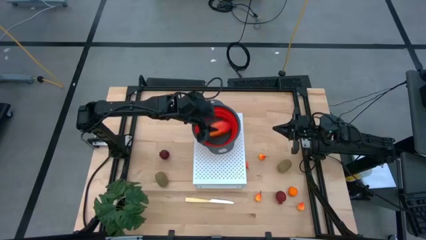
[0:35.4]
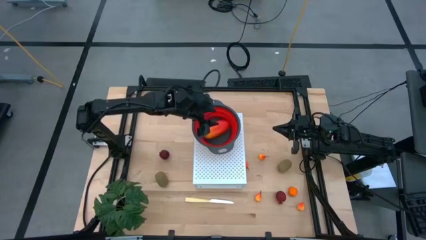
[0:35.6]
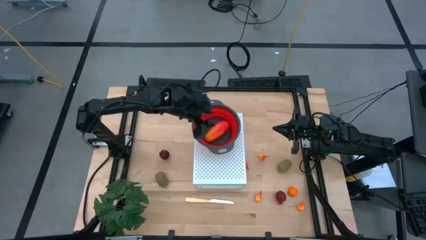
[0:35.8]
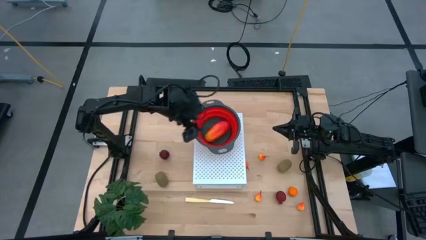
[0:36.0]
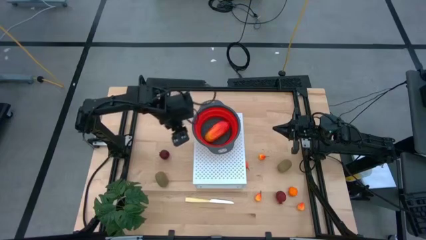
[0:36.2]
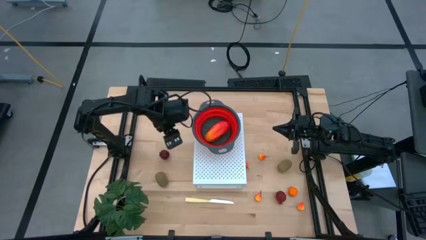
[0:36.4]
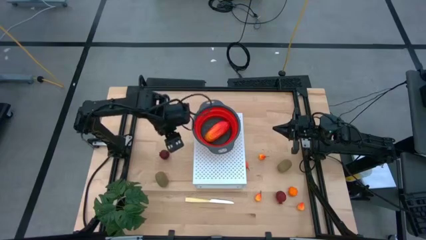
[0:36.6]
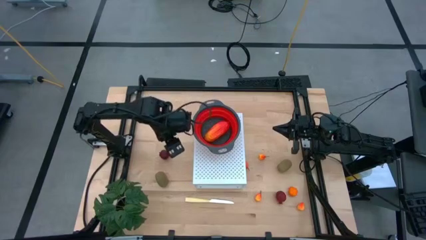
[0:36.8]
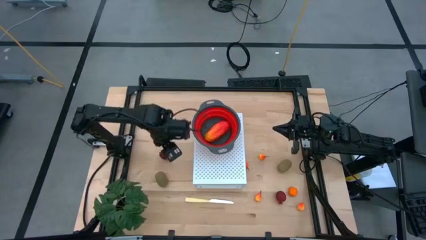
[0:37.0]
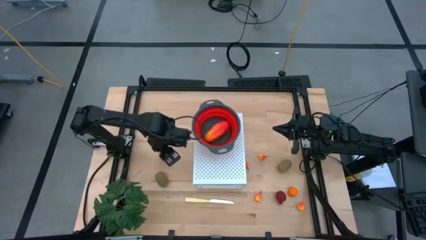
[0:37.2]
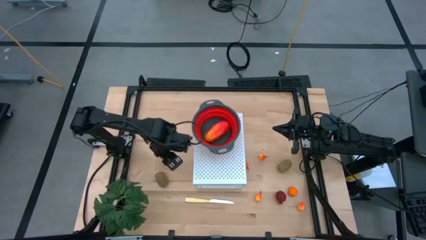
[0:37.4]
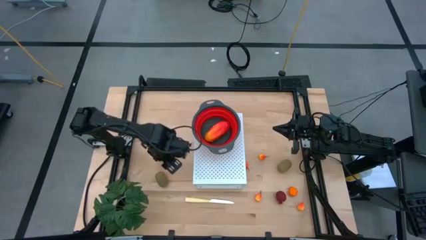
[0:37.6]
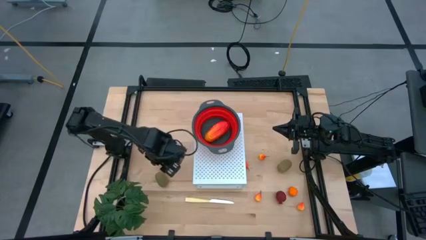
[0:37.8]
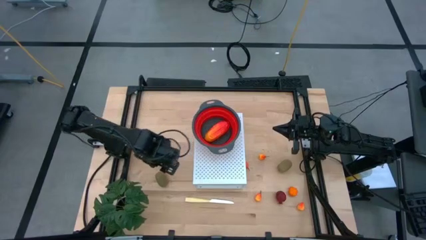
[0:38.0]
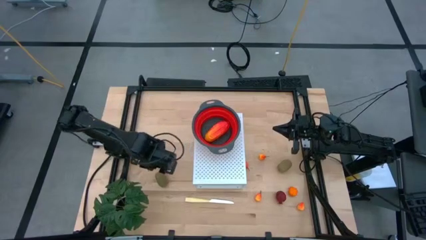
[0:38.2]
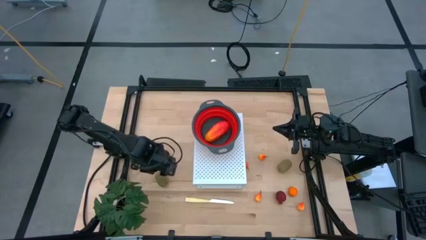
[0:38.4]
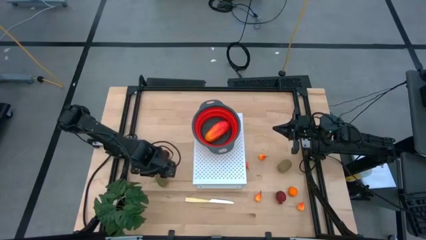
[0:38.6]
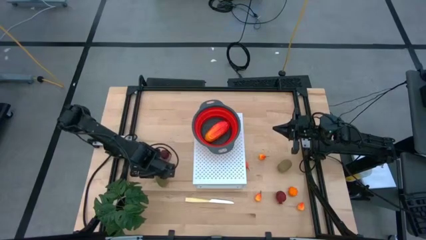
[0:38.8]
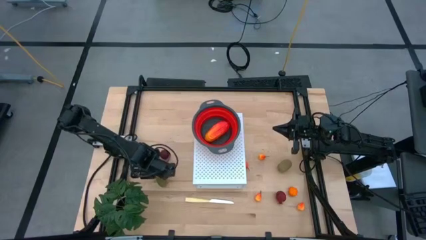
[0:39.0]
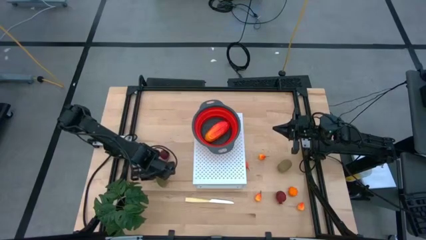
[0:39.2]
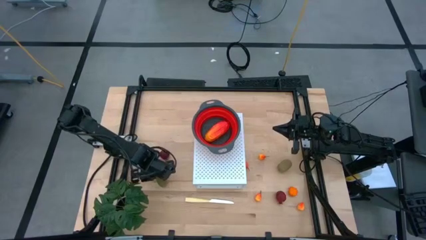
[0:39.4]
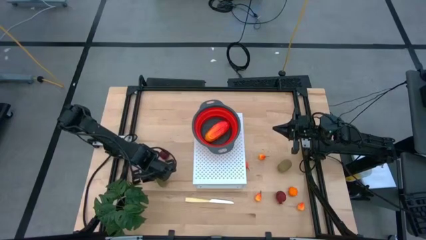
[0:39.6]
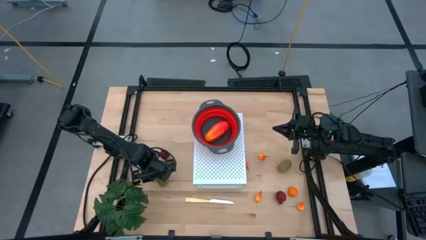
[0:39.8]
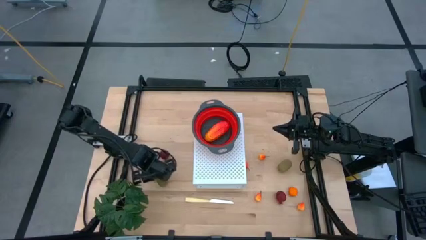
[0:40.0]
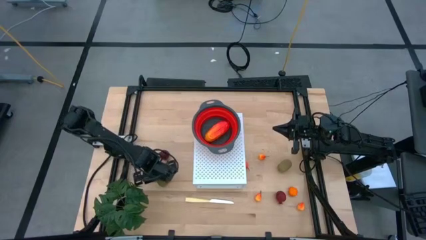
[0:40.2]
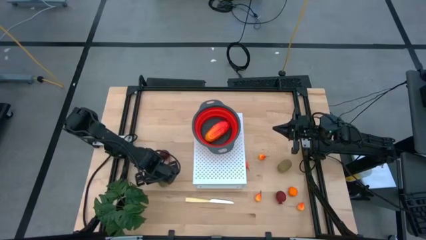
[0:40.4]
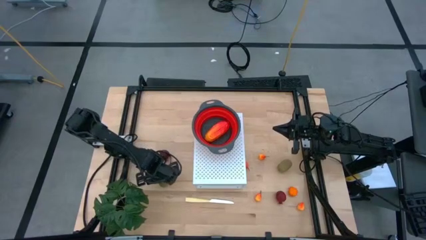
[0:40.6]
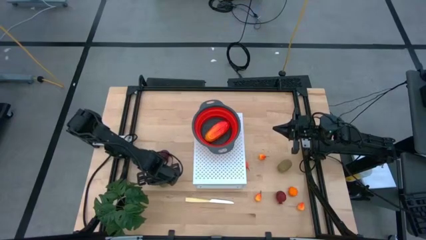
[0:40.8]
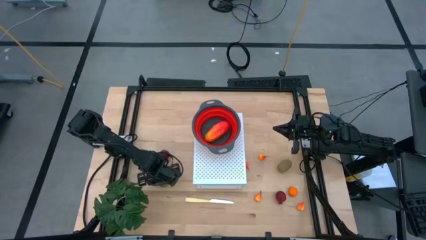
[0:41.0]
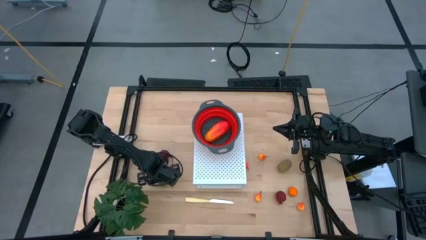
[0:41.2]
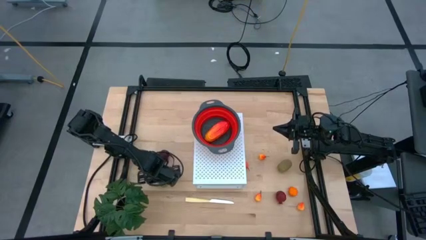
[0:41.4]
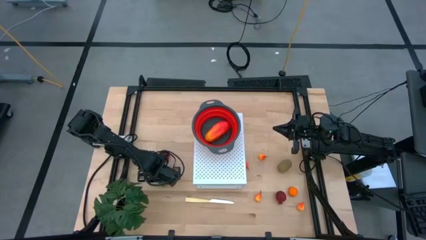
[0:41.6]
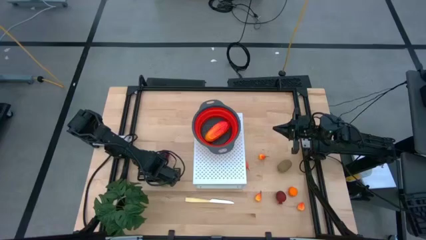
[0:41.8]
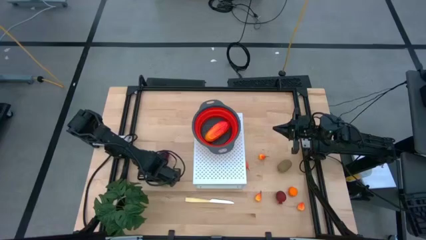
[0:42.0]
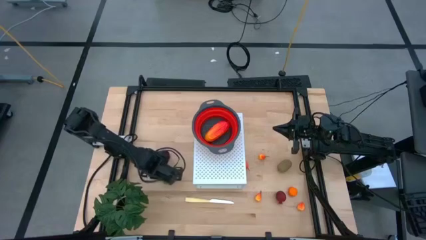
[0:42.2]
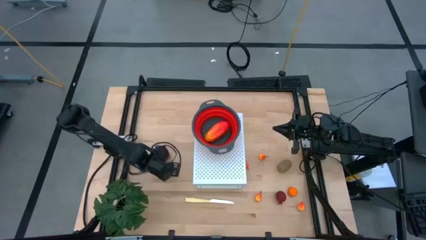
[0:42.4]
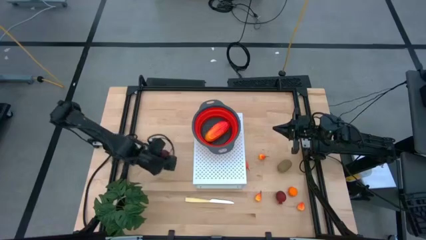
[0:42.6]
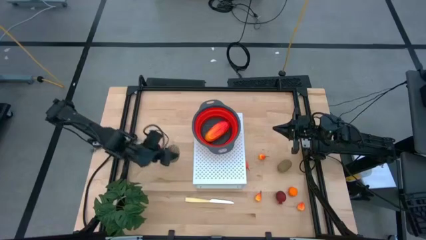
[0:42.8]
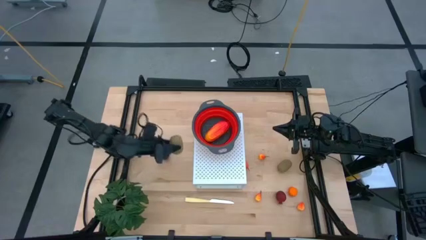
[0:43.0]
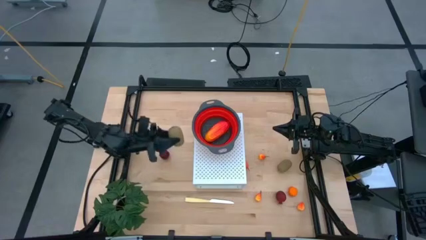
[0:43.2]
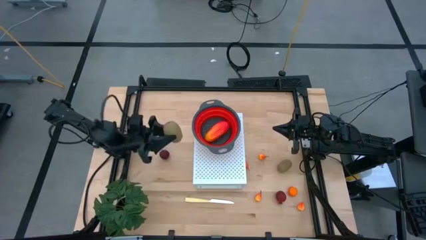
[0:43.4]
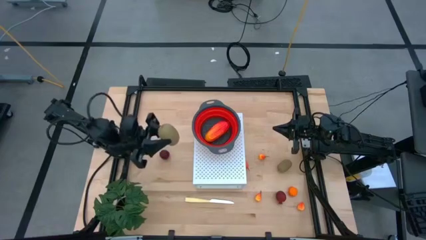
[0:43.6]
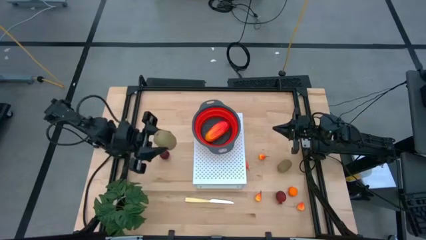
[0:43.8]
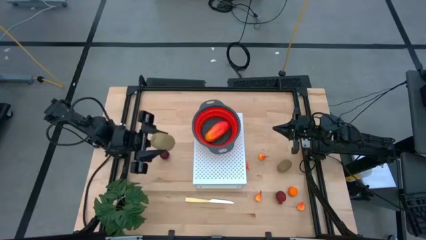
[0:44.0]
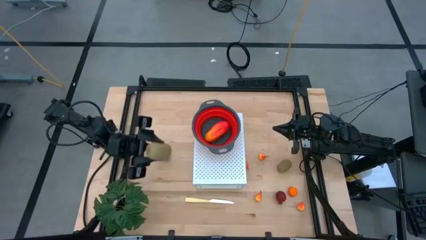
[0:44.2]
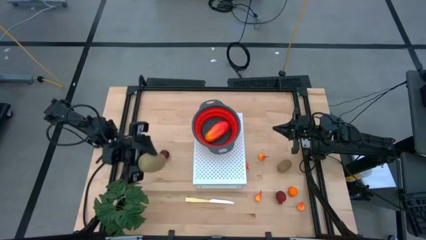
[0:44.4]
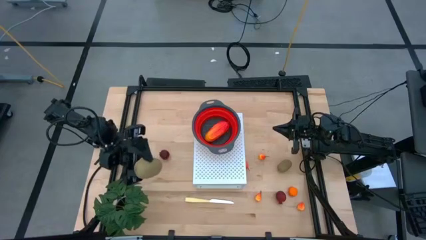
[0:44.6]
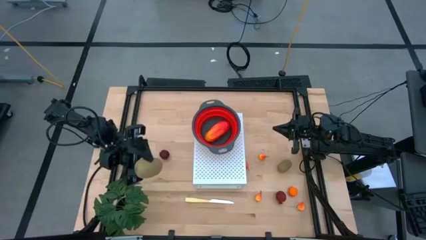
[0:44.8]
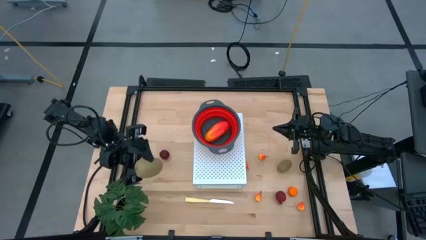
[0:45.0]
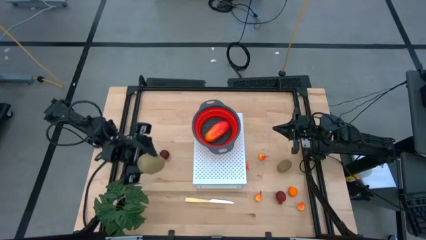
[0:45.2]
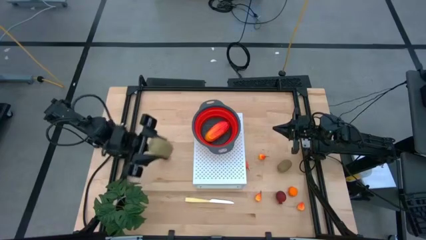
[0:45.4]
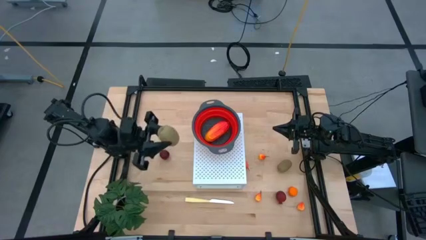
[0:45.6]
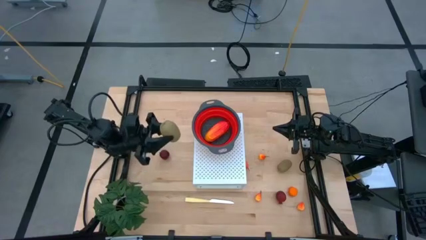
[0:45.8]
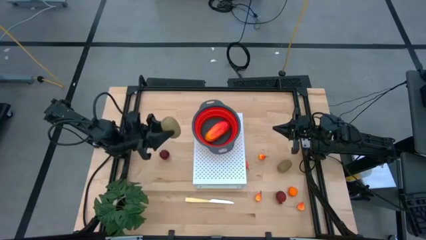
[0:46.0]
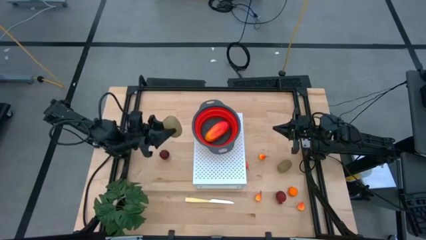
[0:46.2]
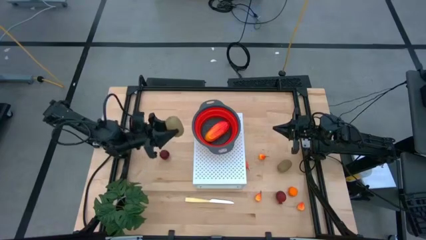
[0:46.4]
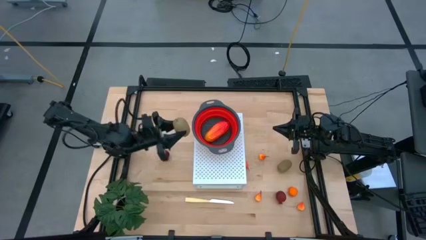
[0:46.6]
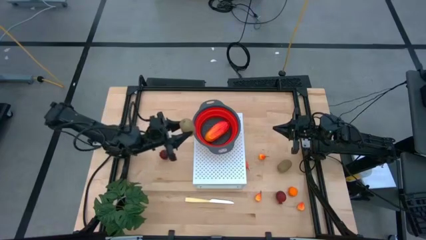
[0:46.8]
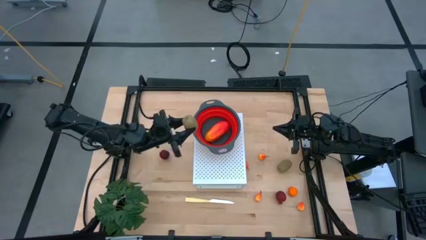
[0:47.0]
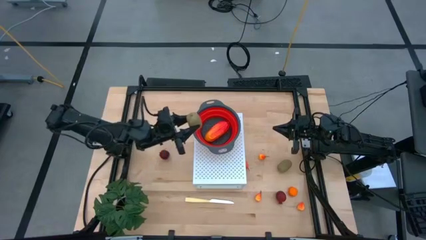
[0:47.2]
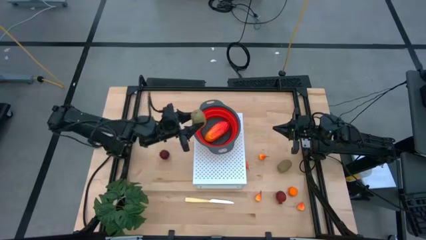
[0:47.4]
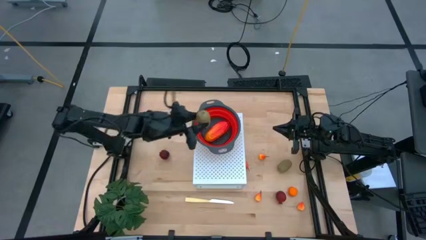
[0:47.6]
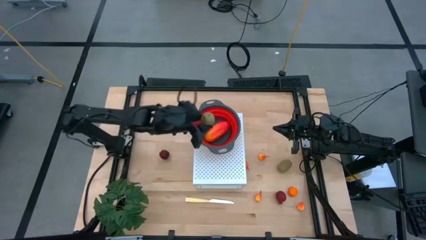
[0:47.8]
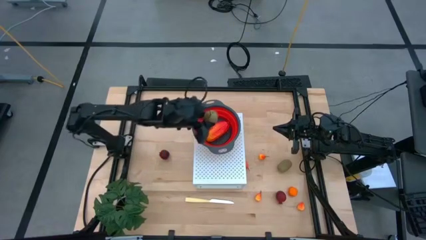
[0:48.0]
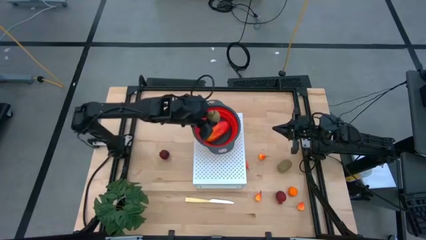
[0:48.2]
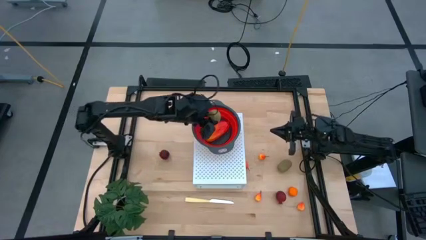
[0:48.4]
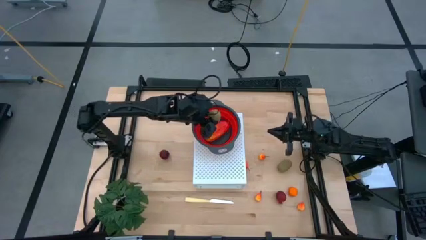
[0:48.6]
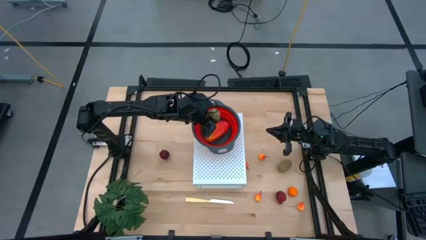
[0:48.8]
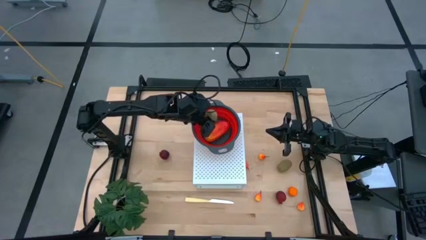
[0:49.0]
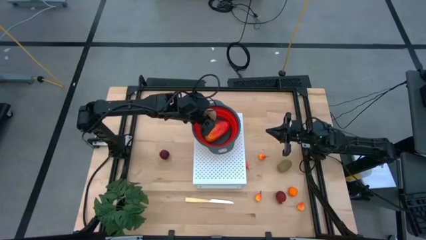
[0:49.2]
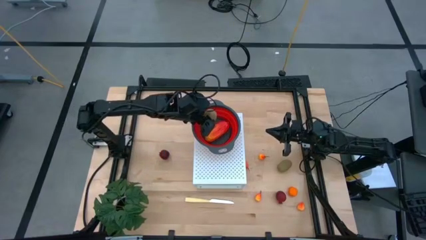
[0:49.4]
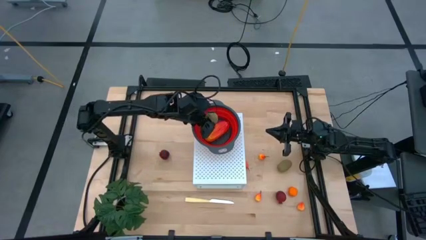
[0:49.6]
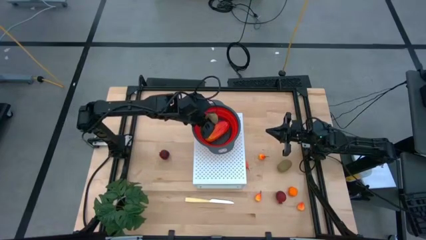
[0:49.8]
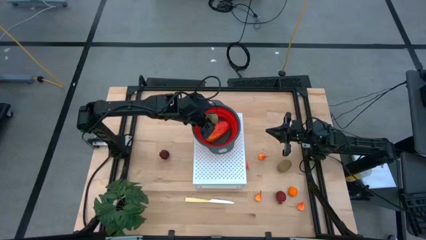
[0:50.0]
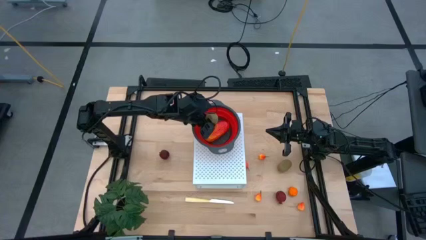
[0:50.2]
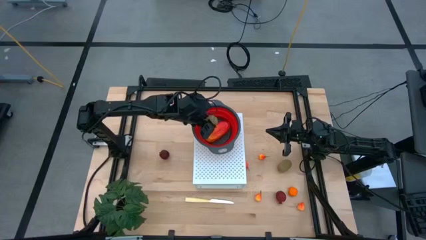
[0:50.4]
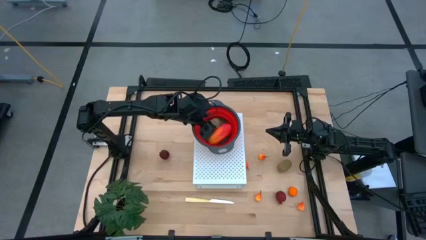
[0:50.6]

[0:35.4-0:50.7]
Task: Pick & Place Fruit
Put the kiwi into the red strainer bowl on the shelf

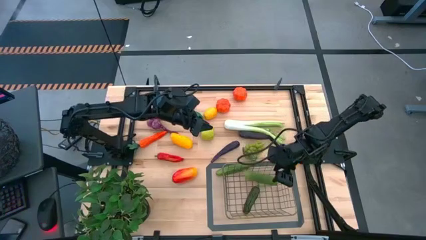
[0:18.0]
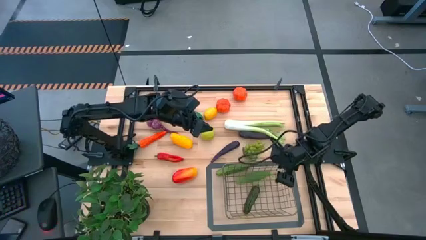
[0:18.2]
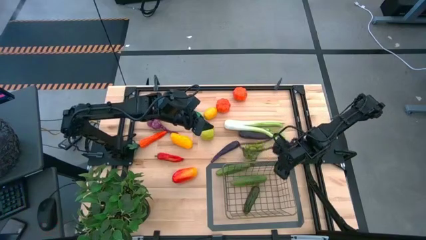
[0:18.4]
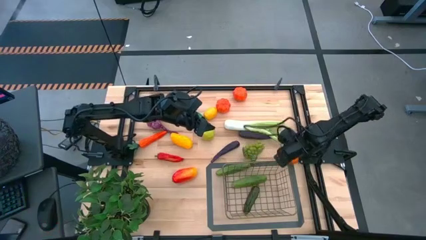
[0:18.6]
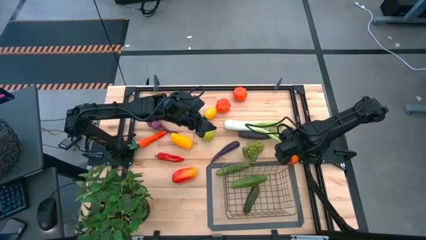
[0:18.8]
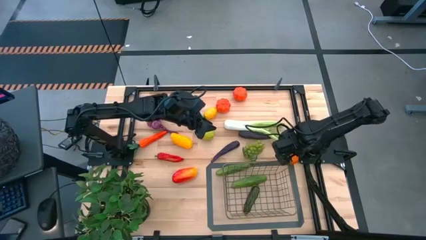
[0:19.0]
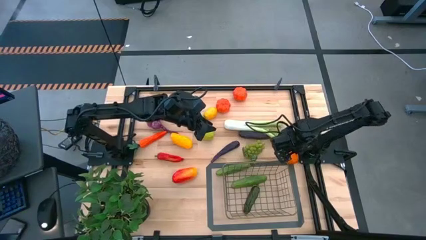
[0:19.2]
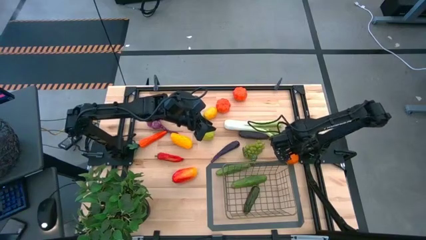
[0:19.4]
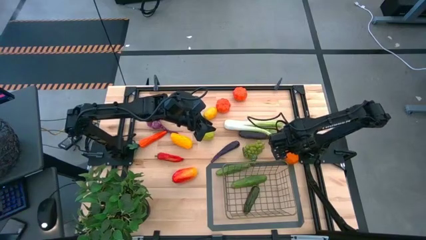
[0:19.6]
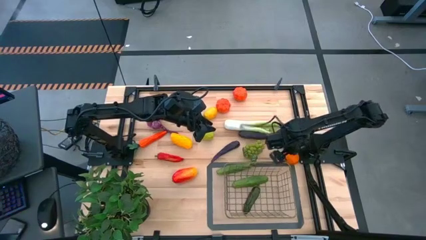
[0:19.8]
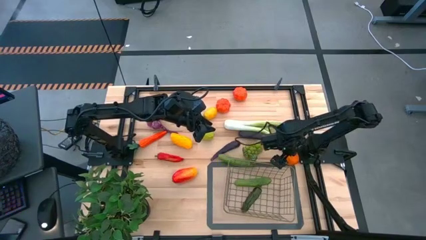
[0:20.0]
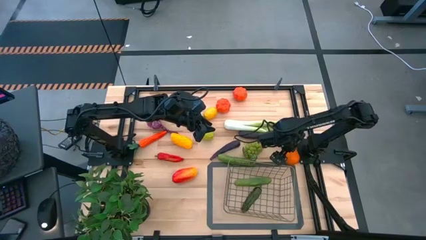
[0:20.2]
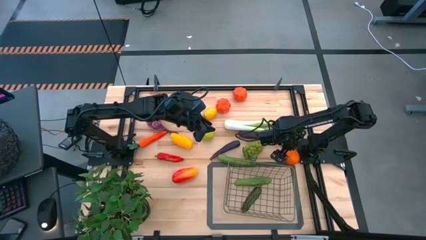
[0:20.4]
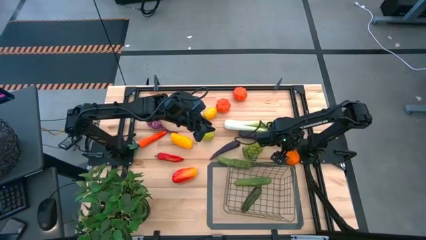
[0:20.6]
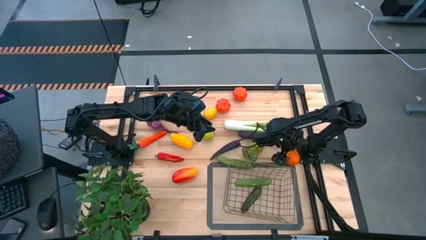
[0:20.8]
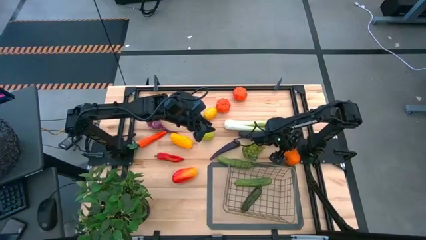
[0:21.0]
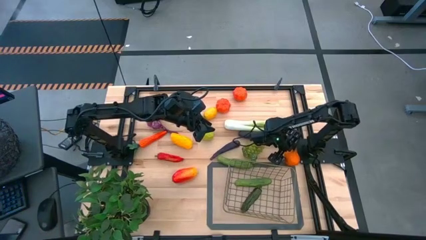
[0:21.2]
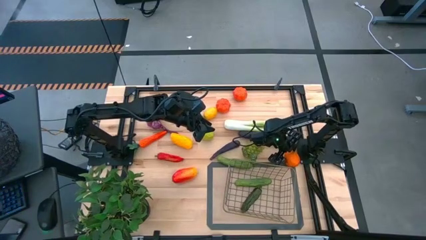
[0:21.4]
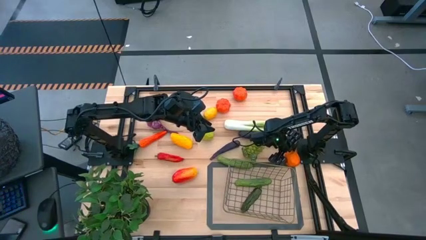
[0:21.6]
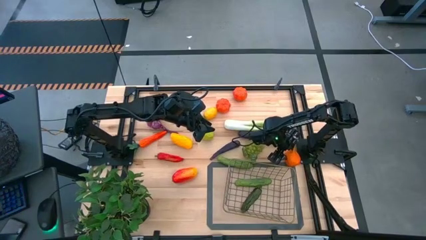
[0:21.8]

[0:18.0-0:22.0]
Task: Build produce basket
Put the orange into the wire basket
